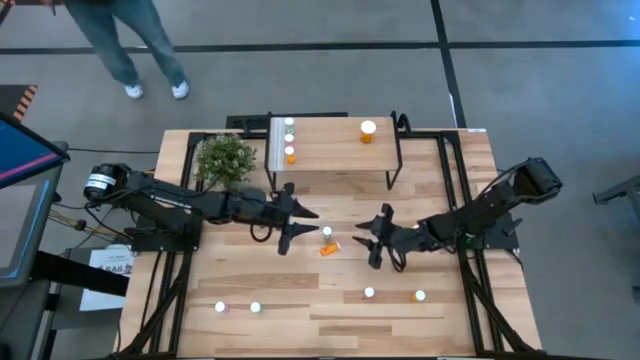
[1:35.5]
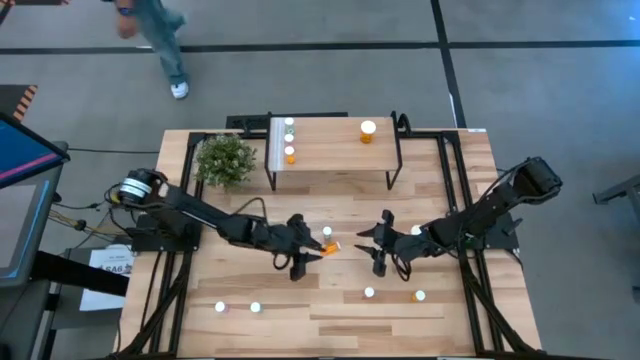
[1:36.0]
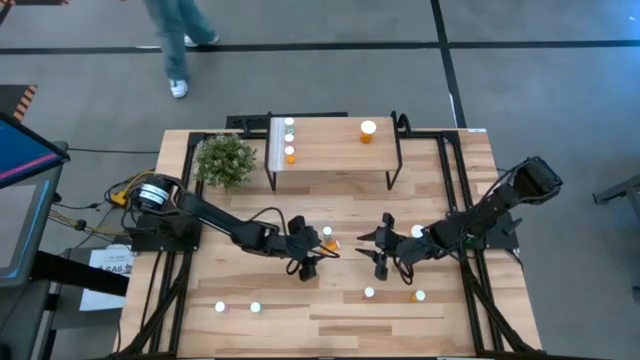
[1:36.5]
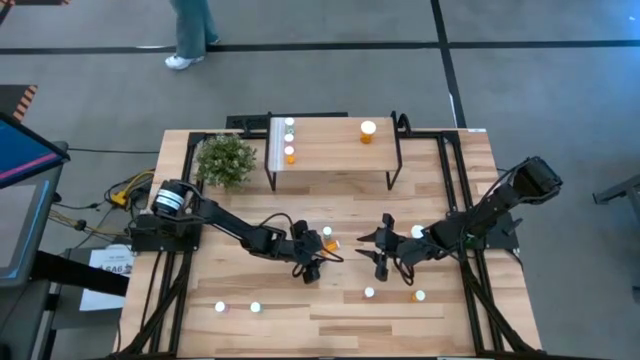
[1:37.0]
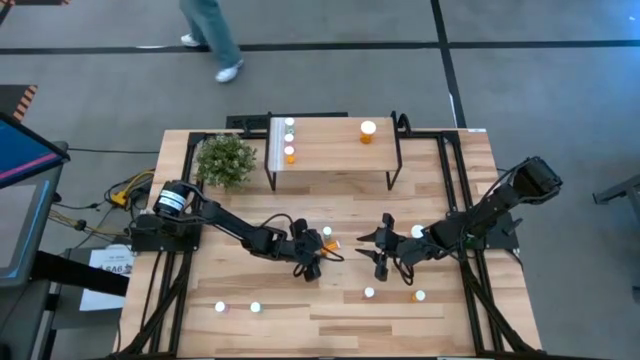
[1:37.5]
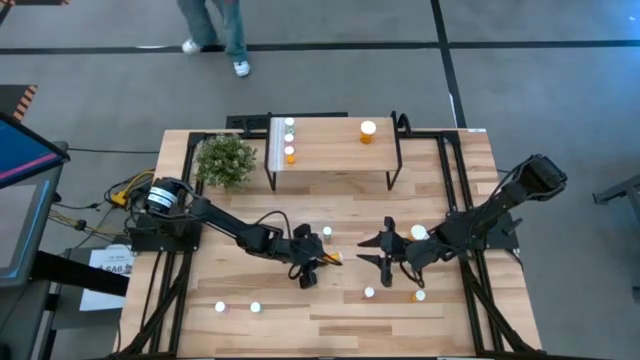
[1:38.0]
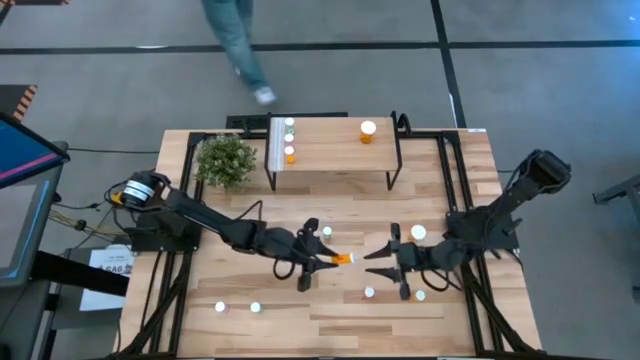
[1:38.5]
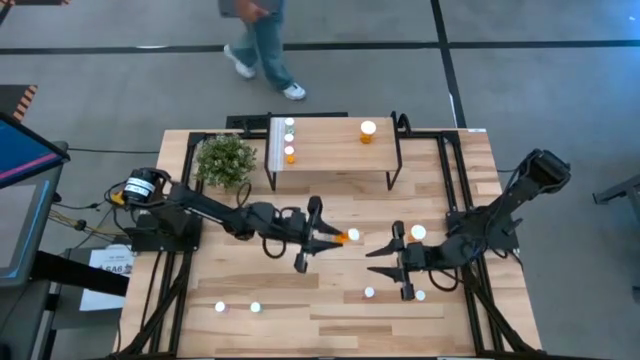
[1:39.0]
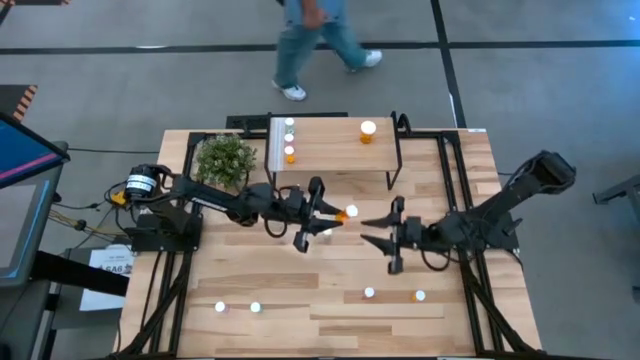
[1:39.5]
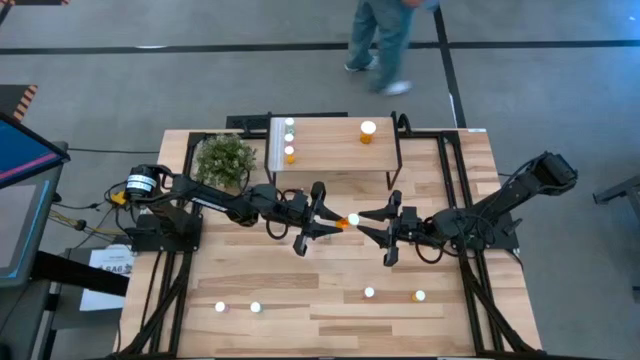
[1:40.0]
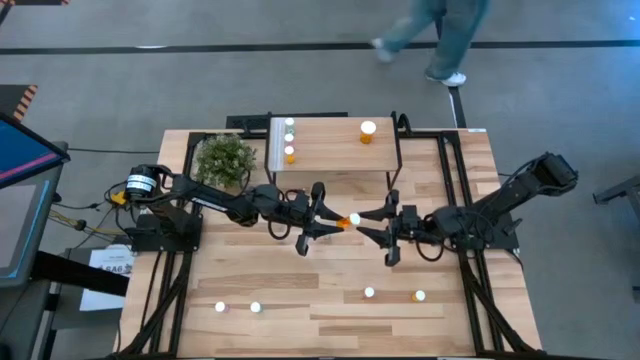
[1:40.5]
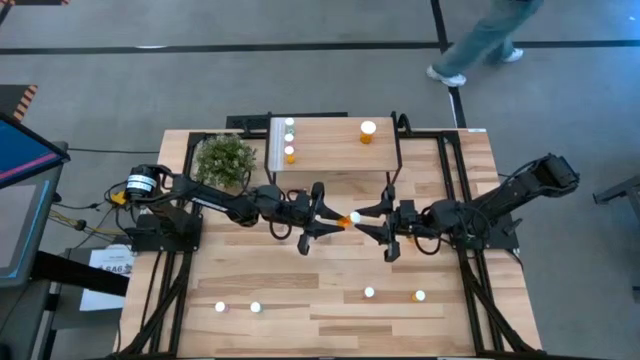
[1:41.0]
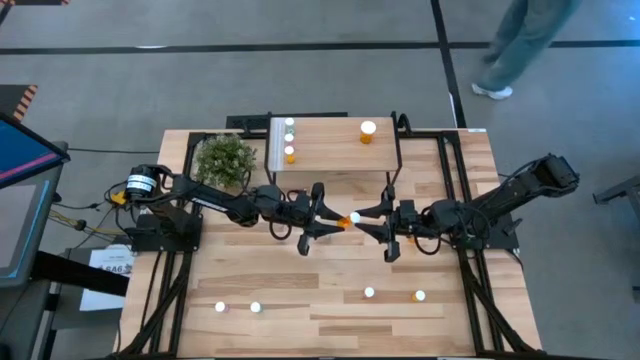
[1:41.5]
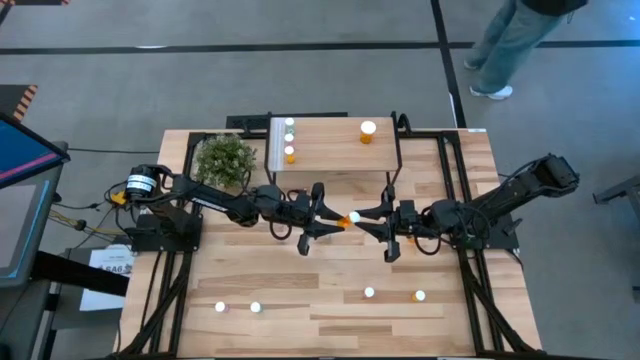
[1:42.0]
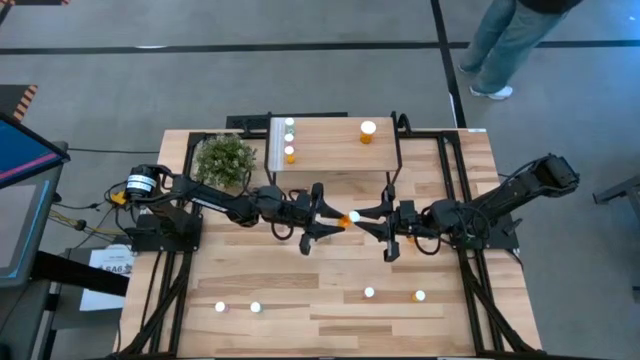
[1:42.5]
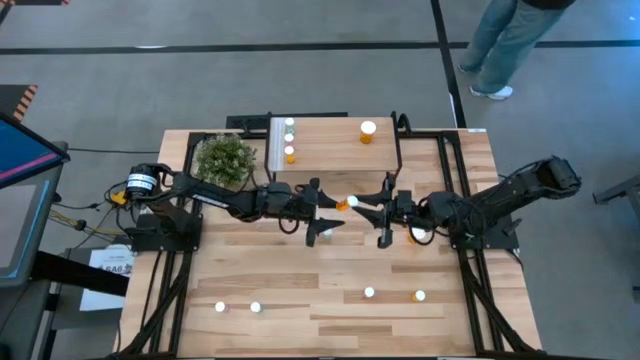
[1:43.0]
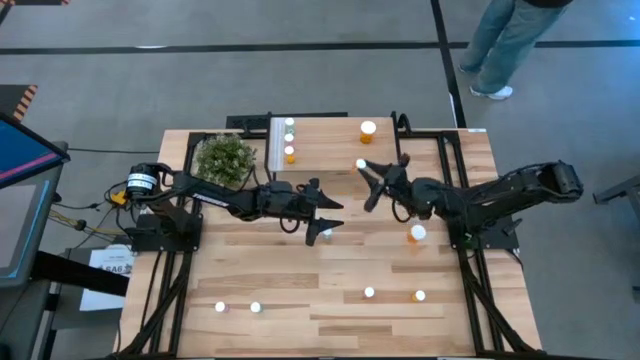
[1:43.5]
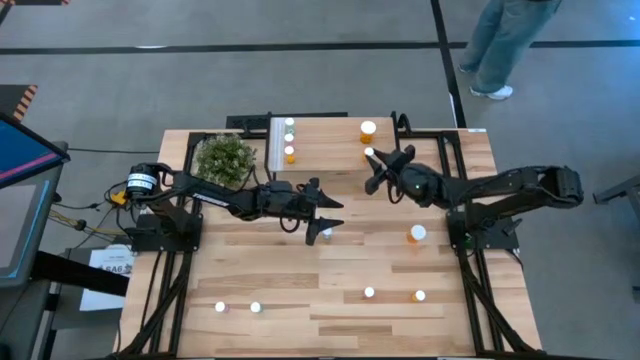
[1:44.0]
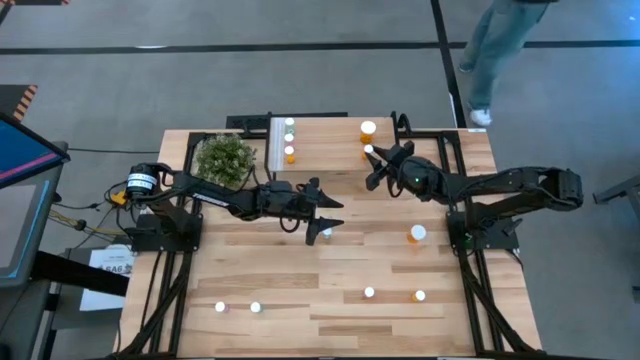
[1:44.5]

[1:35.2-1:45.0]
Task: Pick and place medicine bottles onto shelf by color
Put the top left orange small pill bottle on the shelf

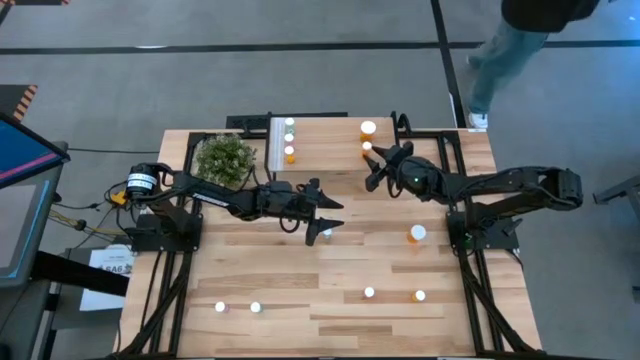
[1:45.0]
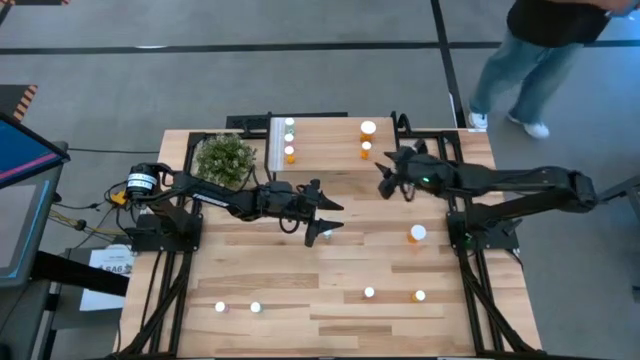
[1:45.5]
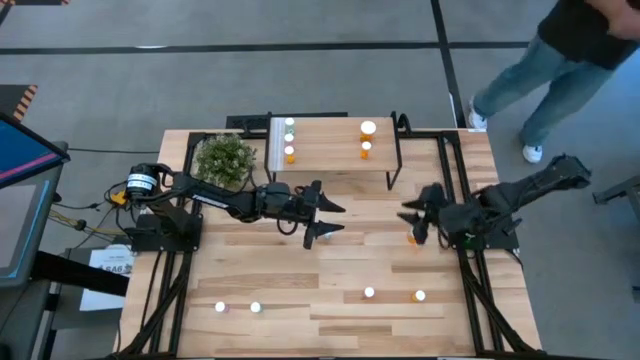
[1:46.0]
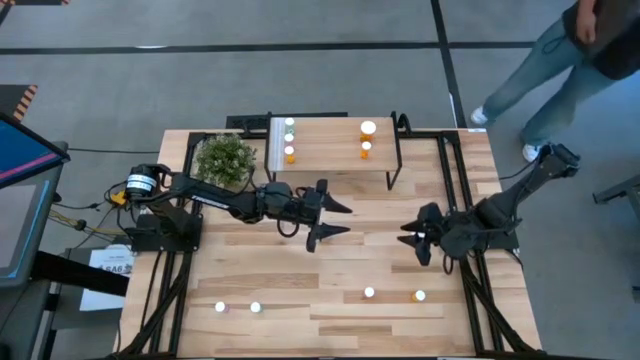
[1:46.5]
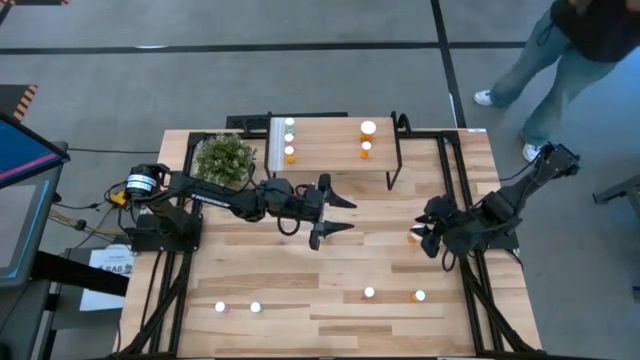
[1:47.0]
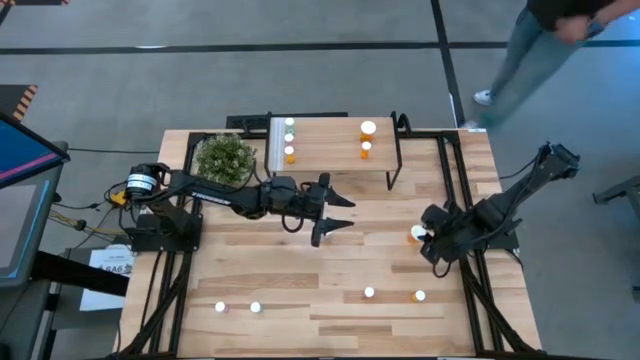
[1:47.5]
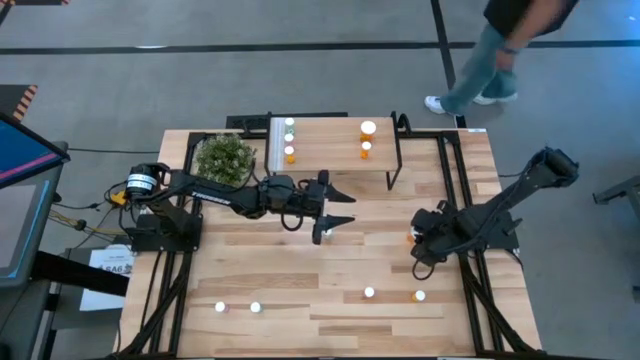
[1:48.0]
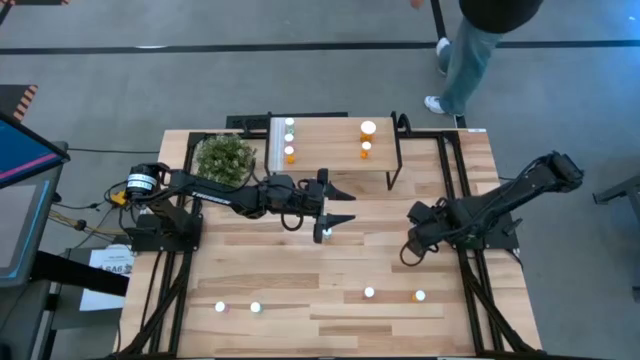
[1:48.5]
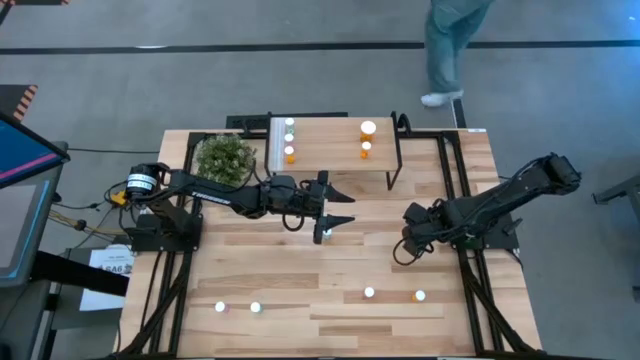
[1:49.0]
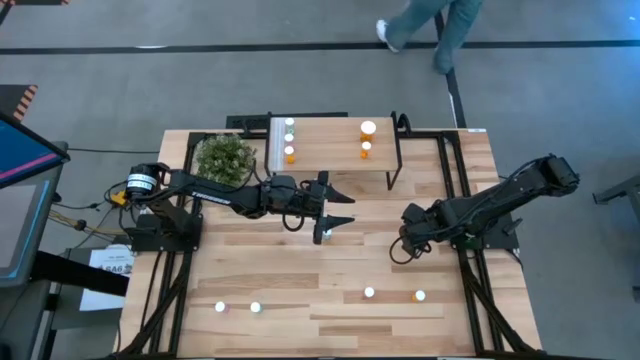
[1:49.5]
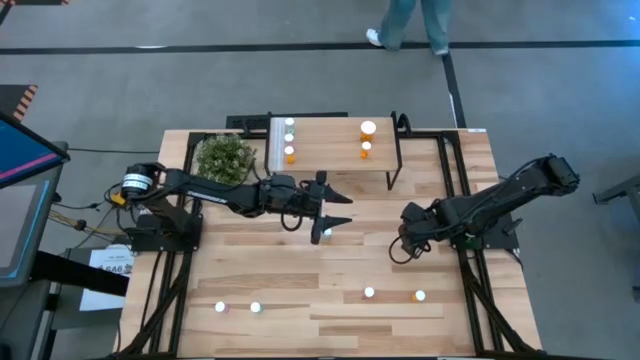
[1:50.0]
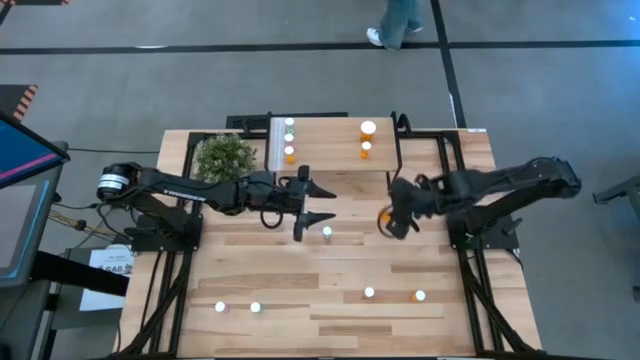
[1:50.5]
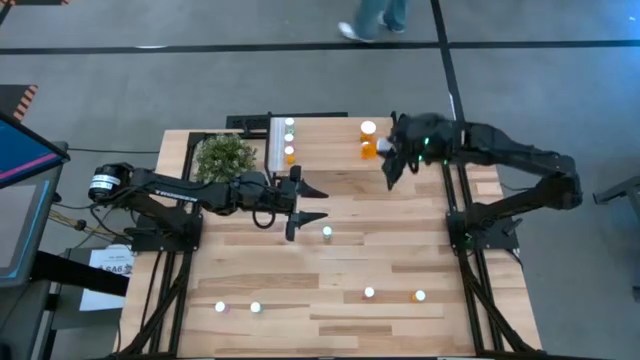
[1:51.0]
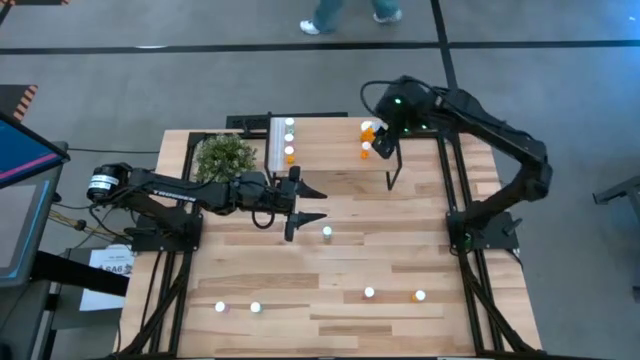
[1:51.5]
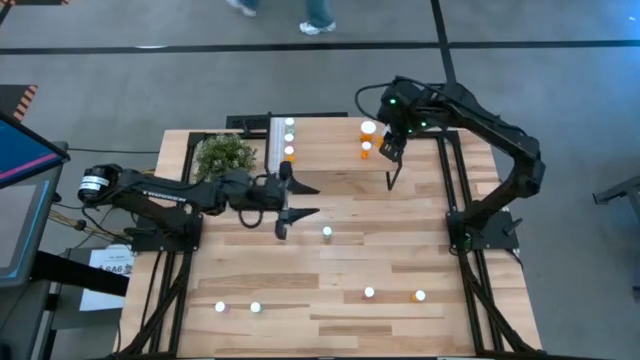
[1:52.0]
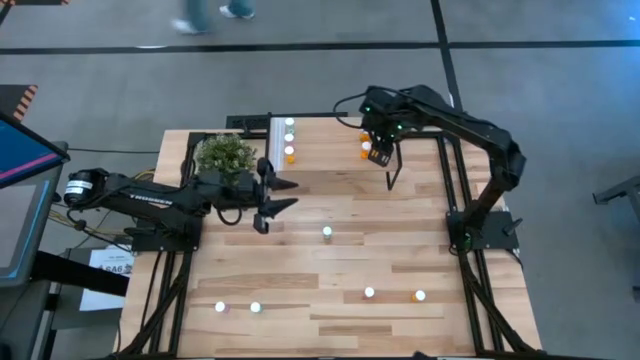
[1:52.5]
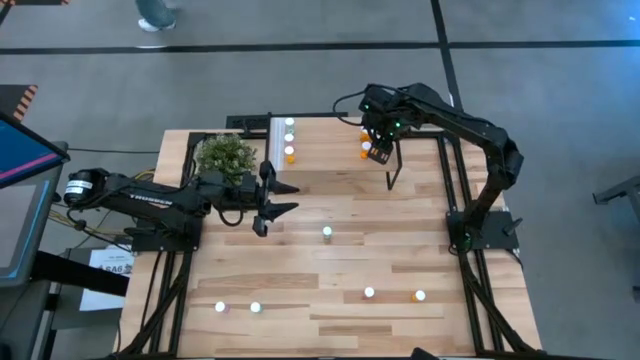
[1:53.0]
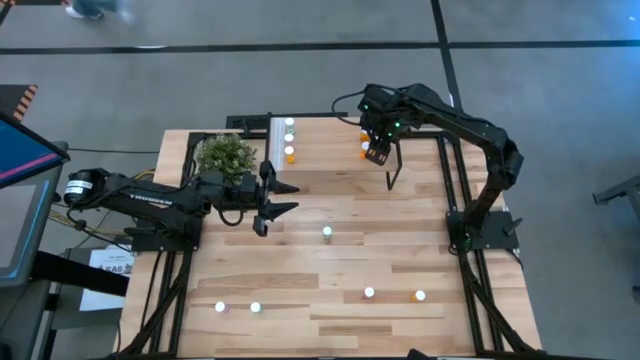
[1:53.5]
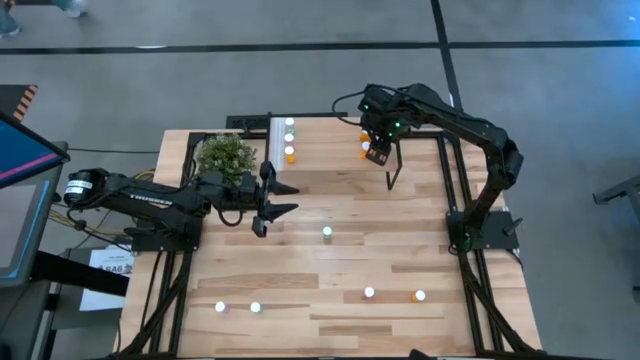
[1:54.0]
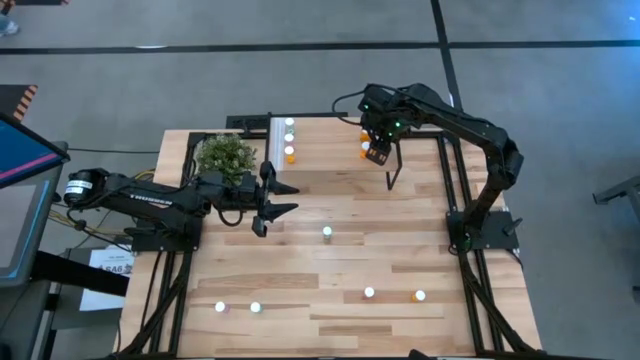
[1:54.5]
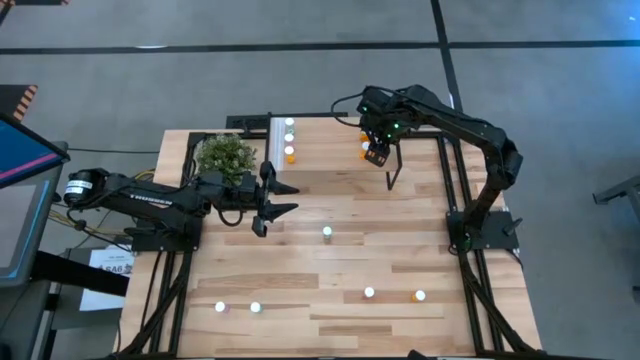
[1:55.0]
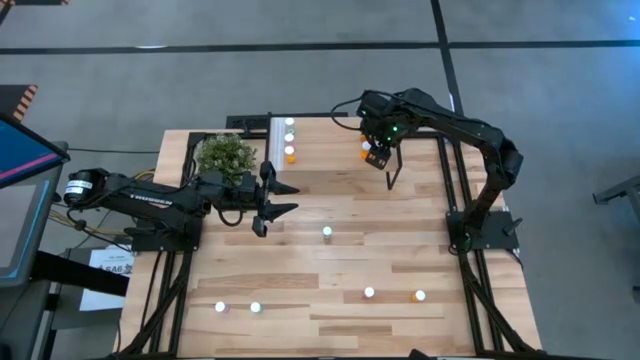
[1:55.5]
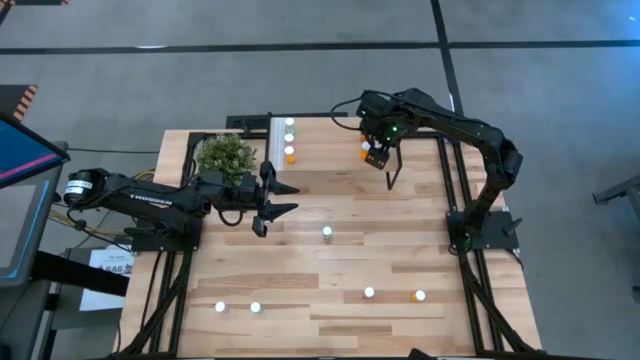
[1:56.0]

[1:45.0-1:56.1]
Put the orange large pill bottle on the shelf
